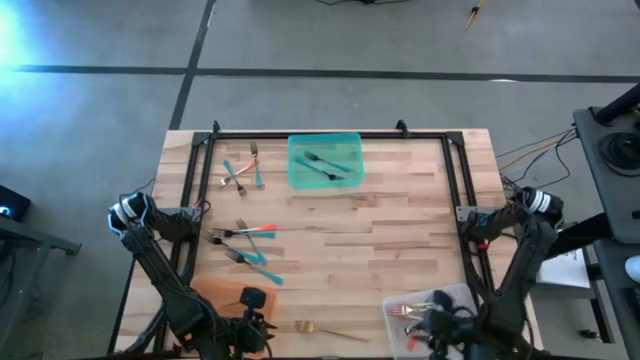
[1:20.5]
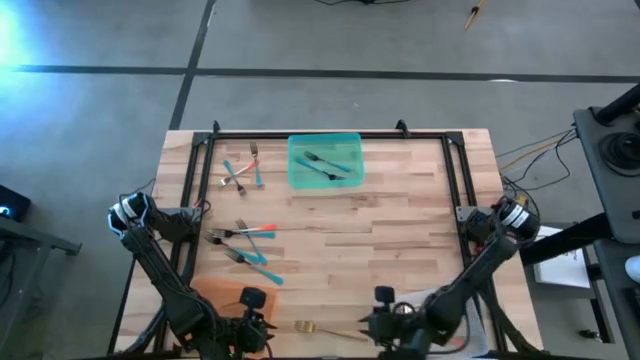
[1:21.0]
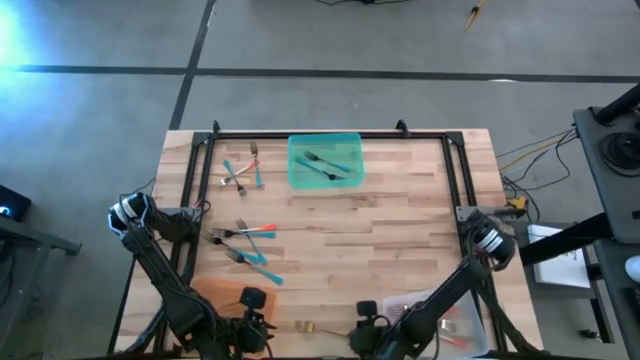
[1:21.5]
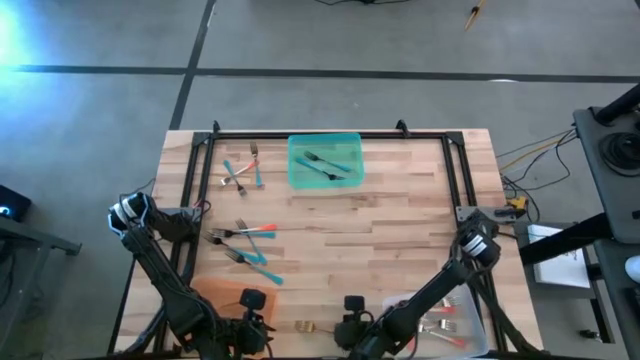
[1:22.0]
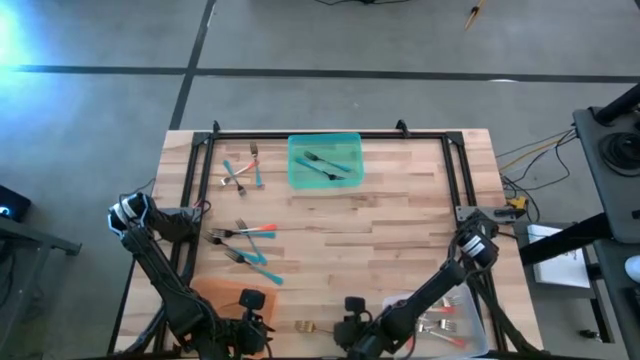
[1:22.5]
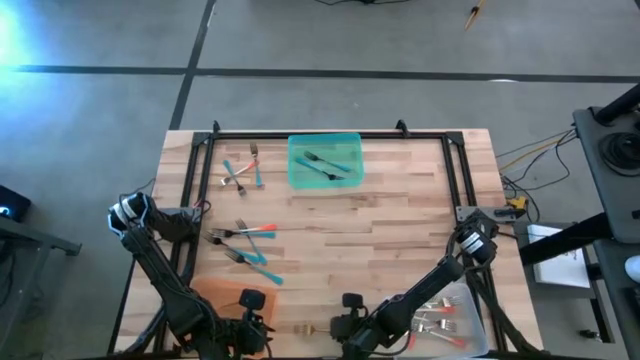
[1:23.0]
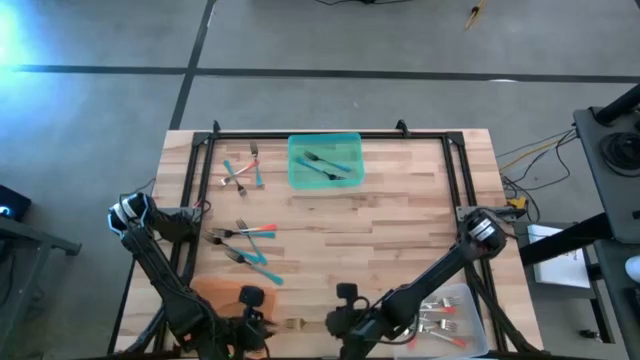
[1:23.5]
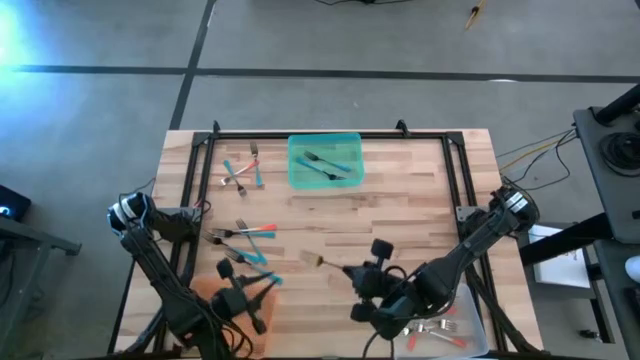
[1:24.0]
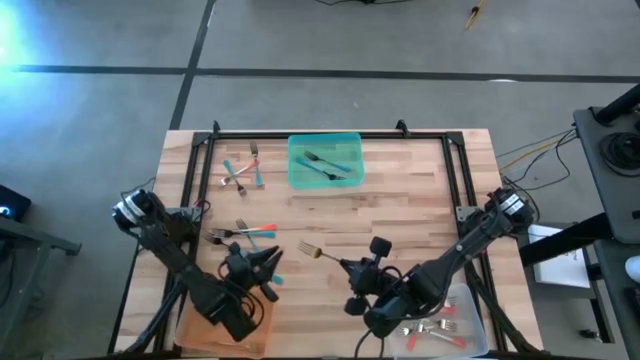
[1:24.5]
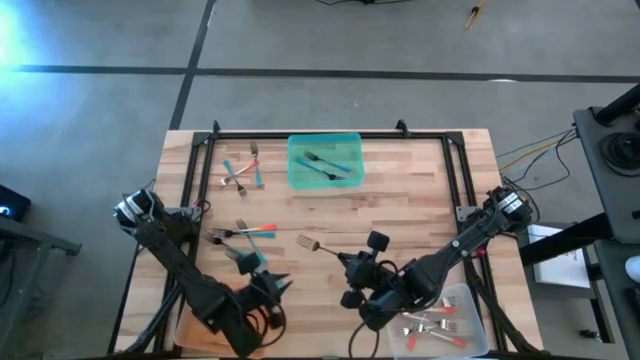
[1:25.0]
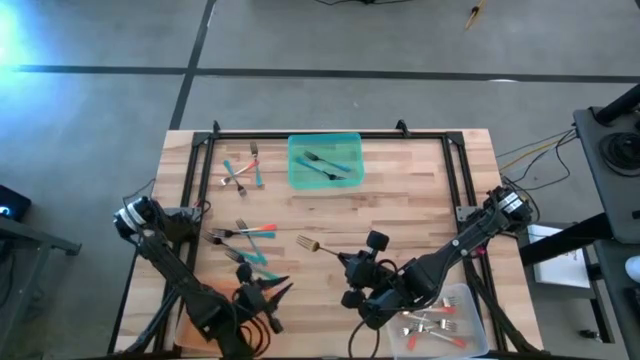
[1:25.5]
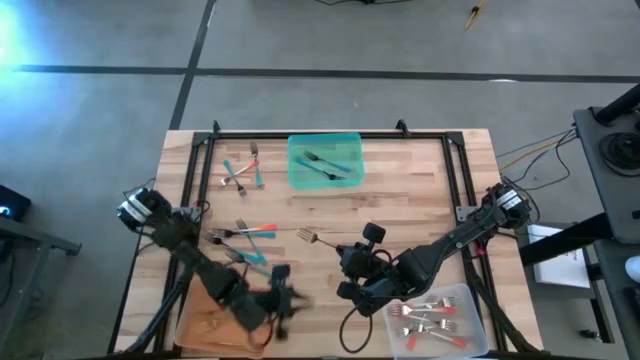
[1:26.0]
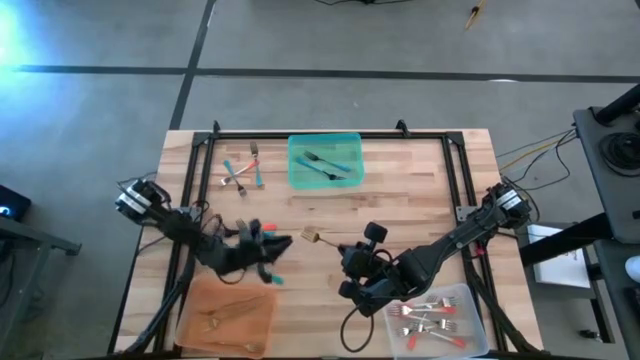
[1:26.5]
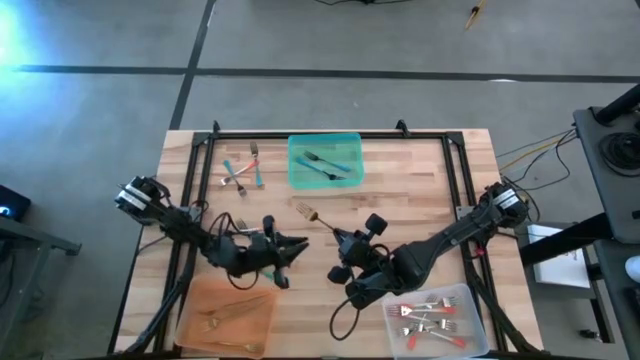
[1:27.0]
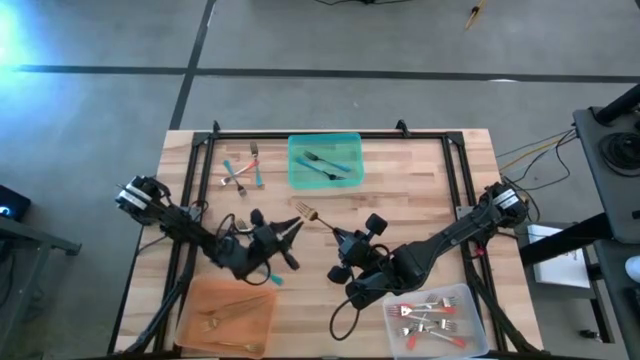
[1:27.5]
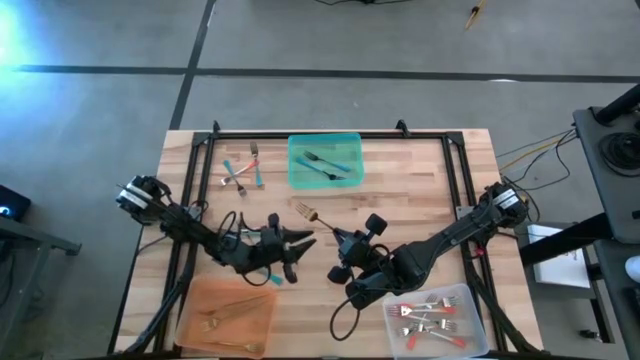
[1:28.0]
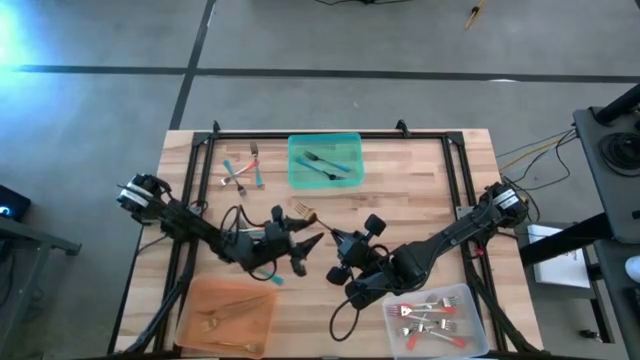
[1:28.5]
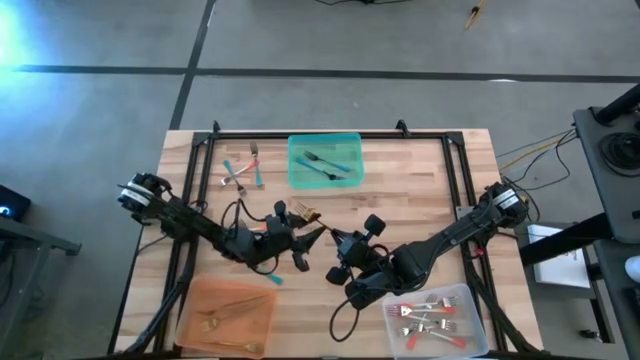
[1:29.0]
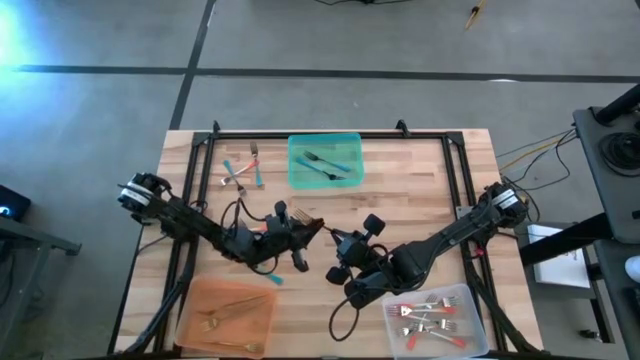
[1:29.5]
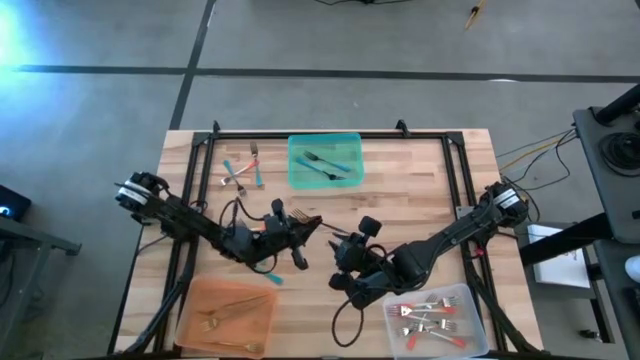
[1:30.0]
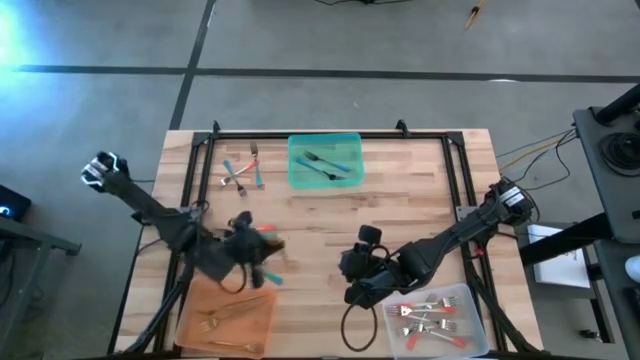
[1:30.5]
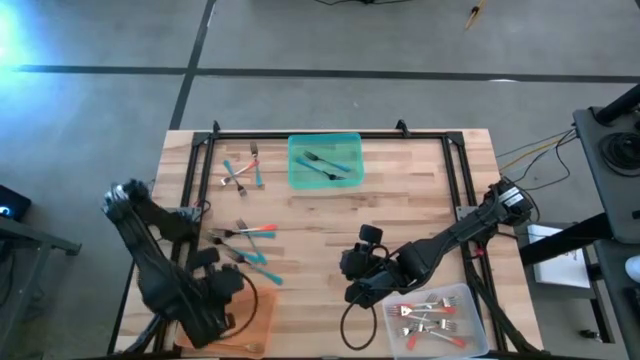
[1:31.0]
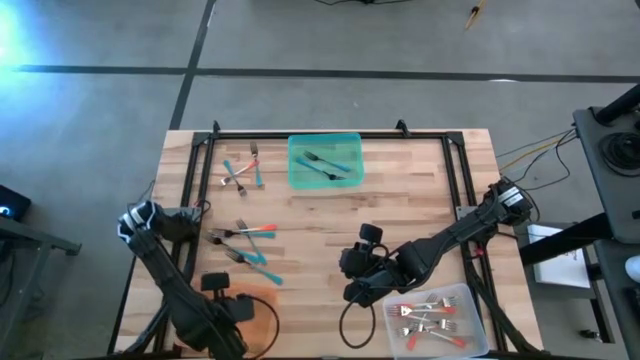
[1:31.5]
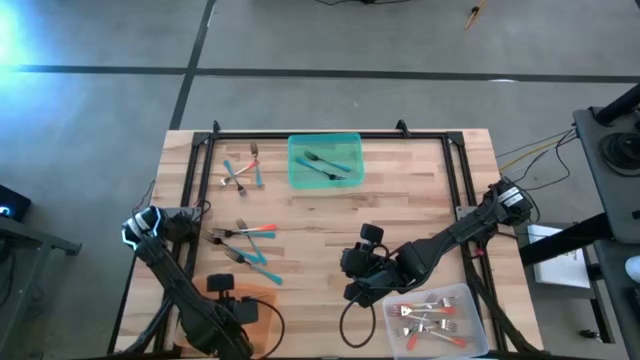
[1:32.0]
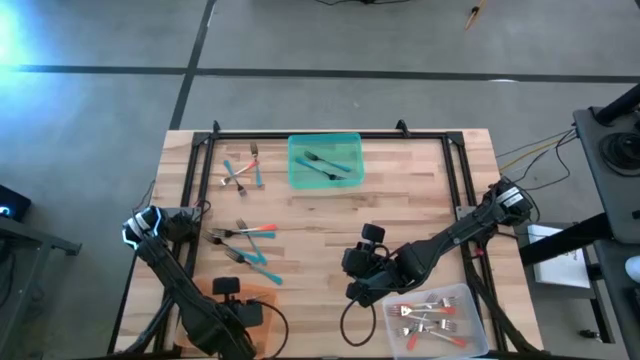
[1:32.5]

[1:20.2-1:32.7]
Task: Sort silverware by color (type)
Put the gold fork into the orange bin

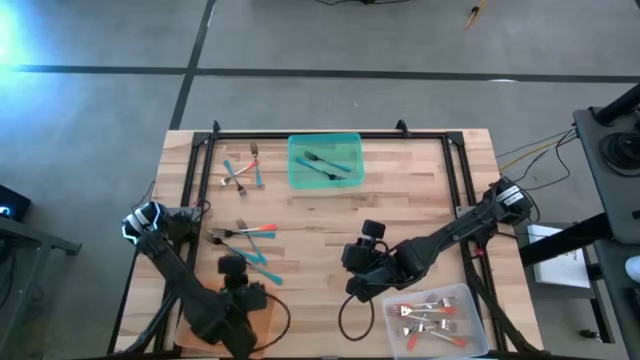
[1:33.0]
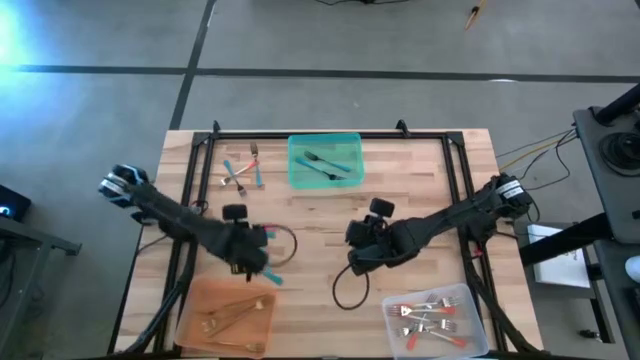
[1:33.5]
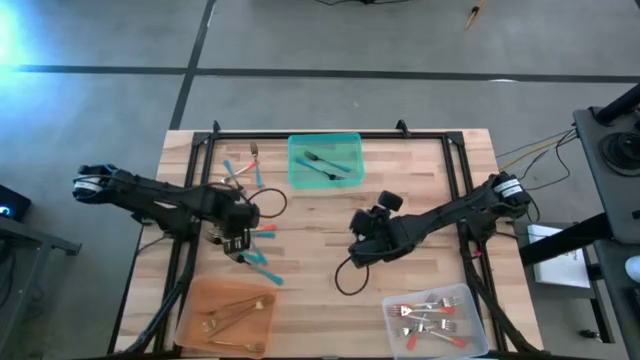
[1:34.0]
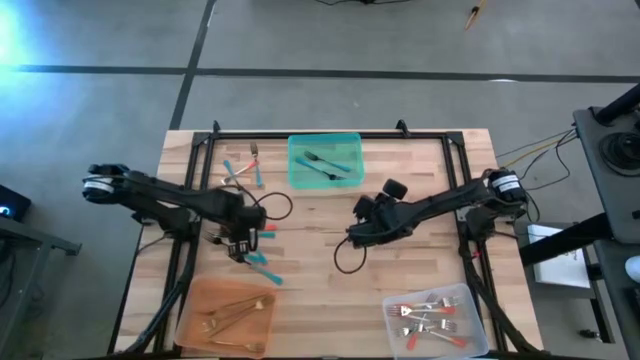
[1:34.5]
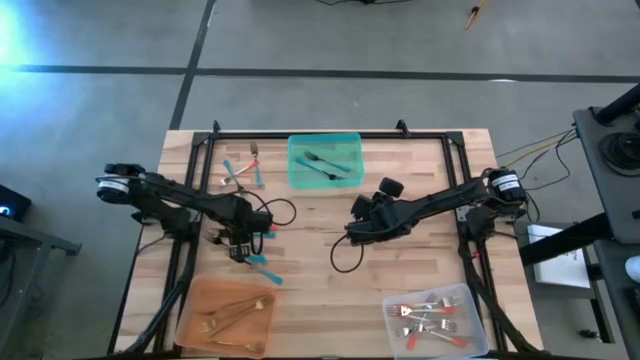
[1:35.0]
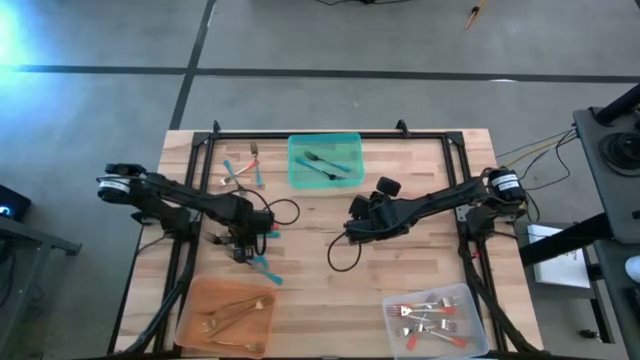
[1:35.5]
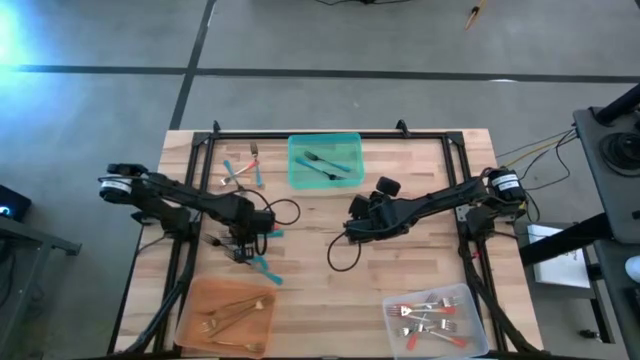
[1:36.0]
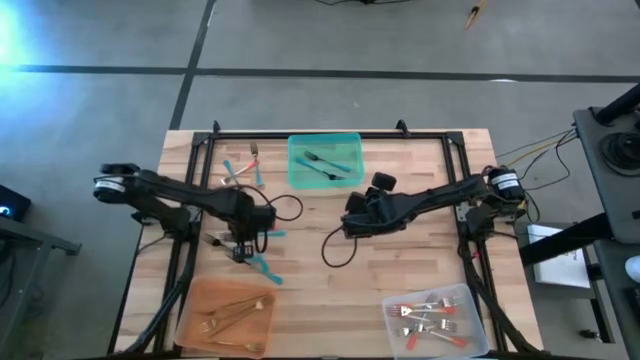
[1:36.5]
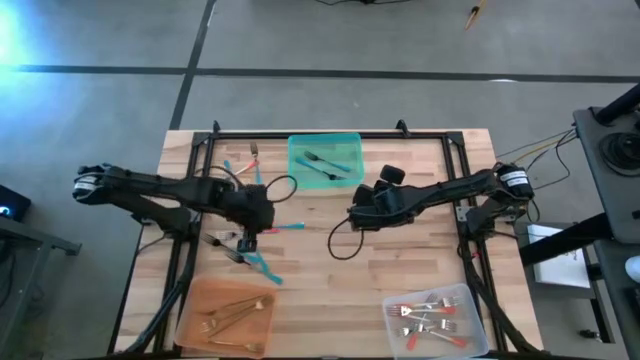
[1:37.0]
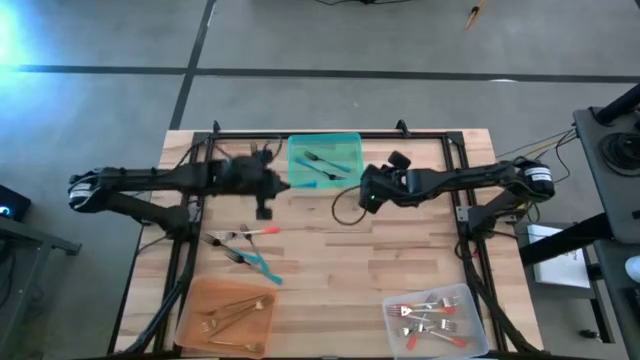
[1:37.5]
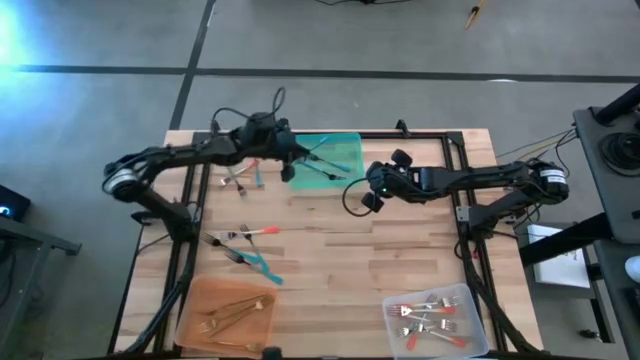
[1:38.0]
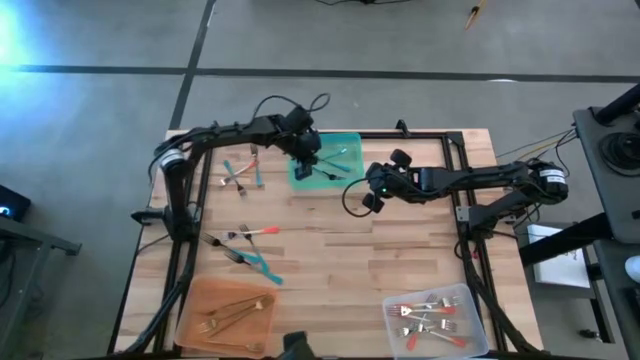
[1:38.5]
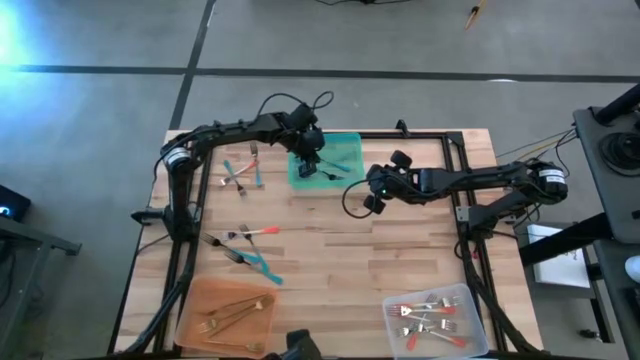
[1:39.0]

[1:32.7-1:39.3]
Put the blue fork into the blue bin

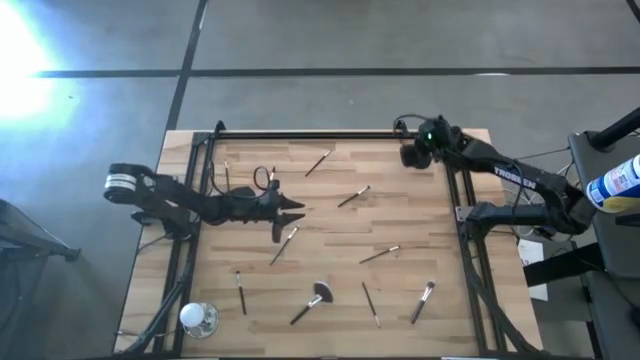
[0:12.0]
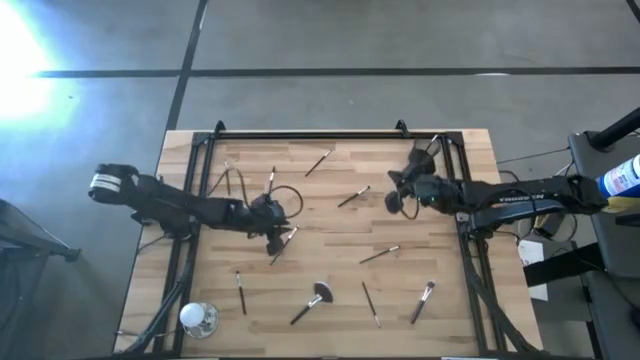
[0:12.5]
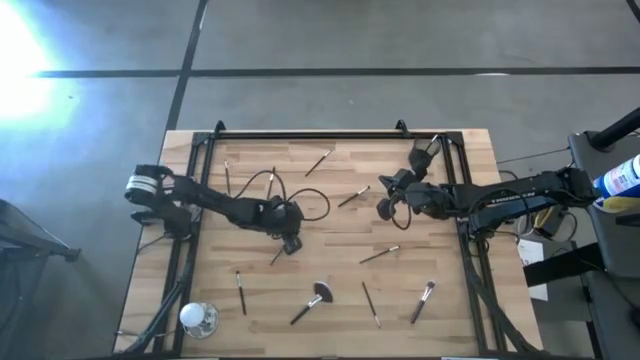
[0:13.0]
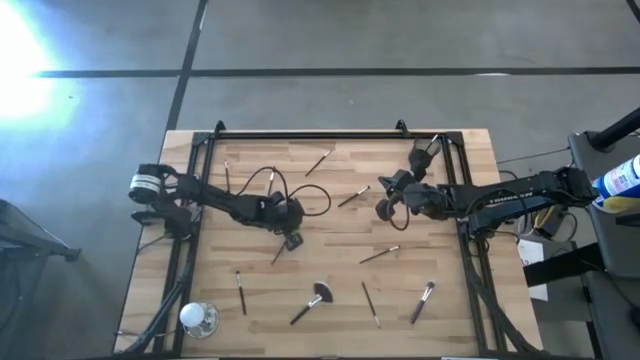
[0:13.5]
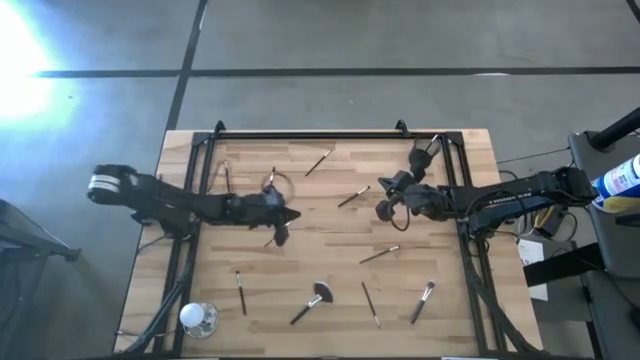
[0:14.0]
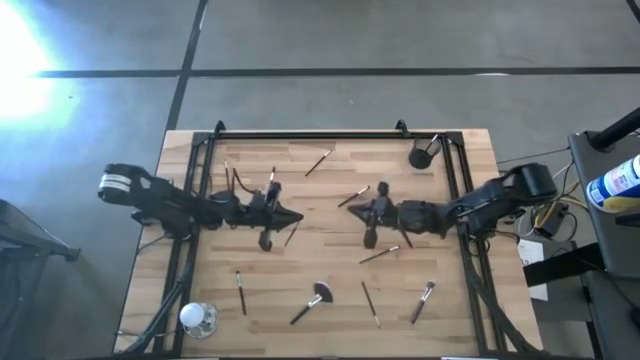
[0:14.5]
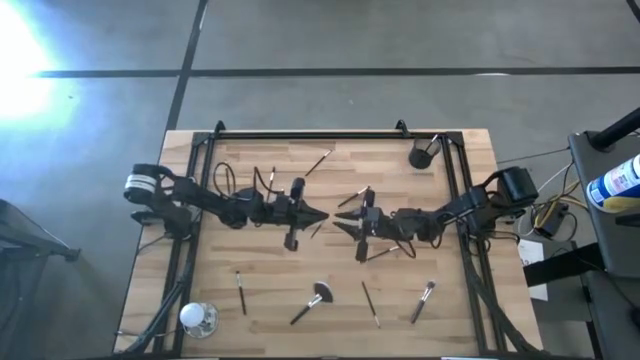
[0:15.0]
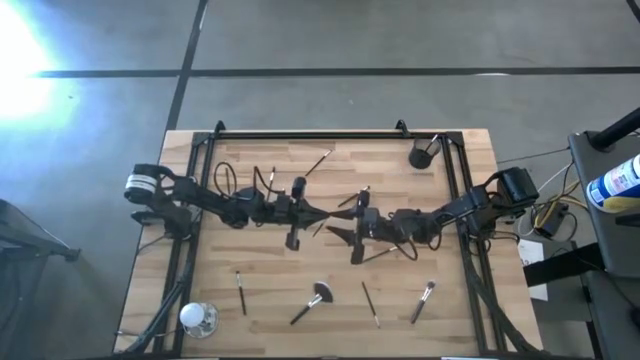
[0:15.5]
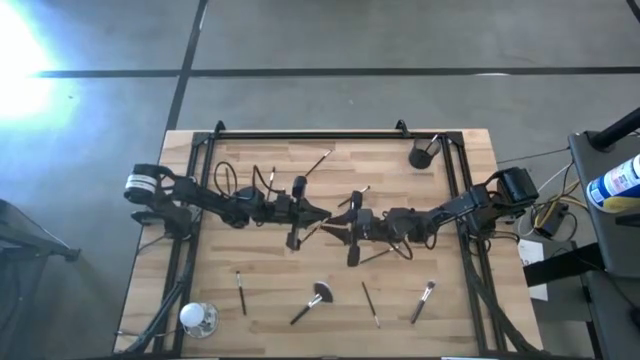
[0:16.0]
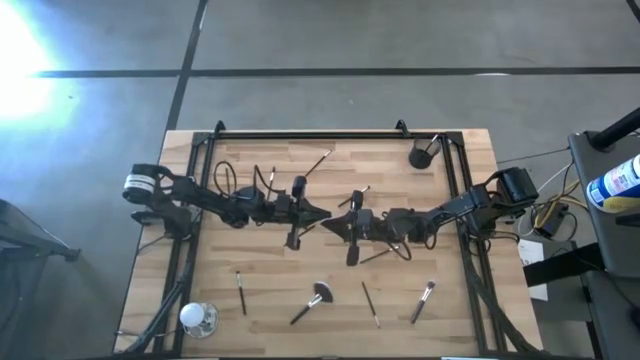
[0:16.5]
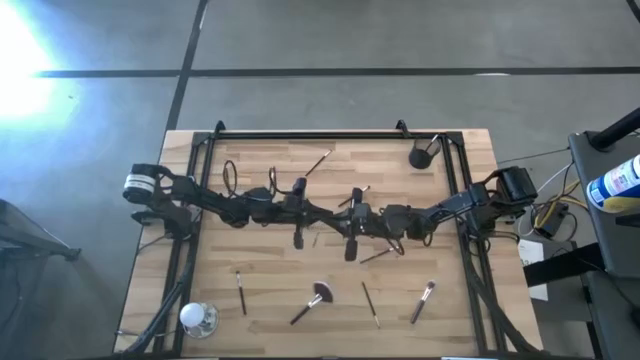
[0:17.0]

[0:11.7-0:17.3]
Task: Put items in baskets/containers
Put the eyeshadow brush into the pen holder
